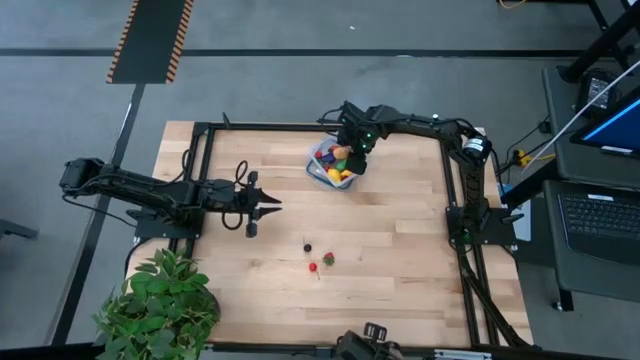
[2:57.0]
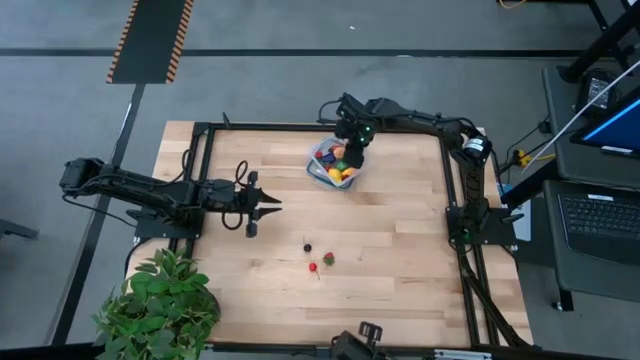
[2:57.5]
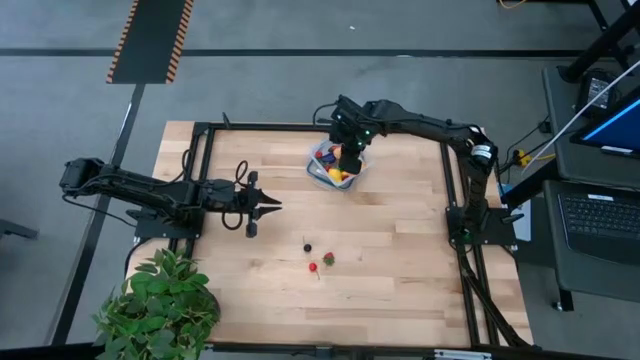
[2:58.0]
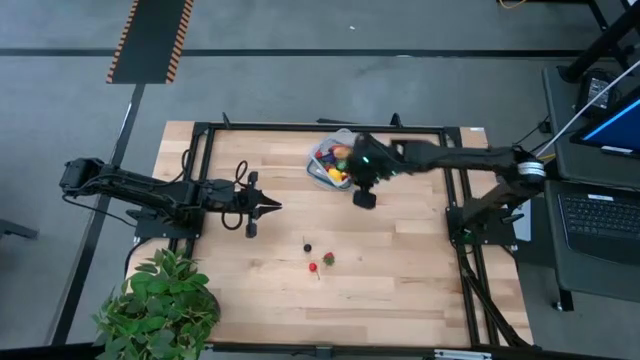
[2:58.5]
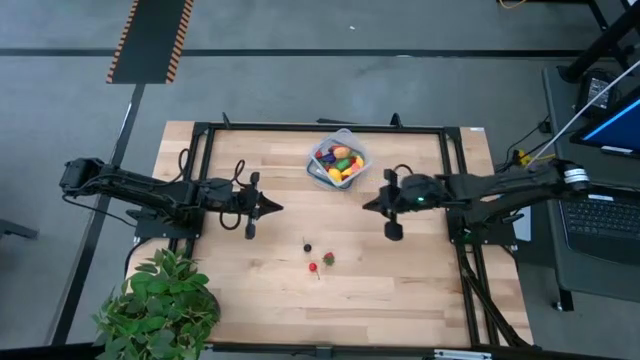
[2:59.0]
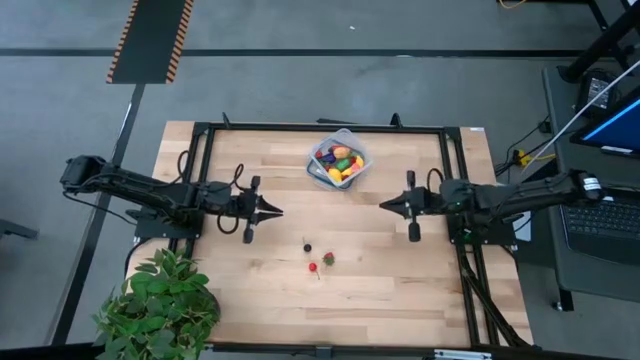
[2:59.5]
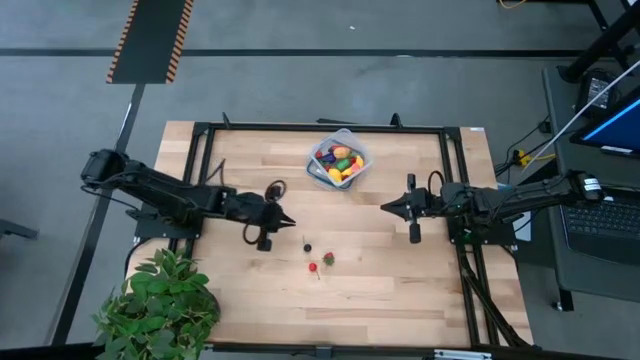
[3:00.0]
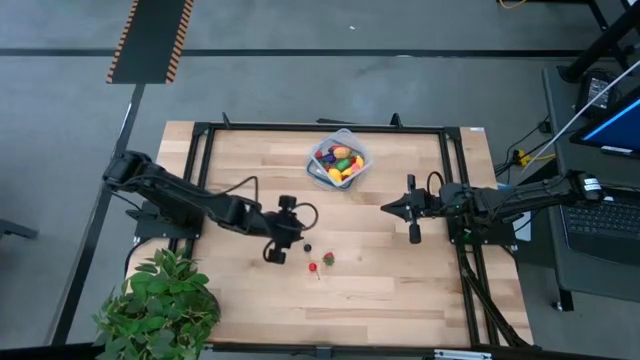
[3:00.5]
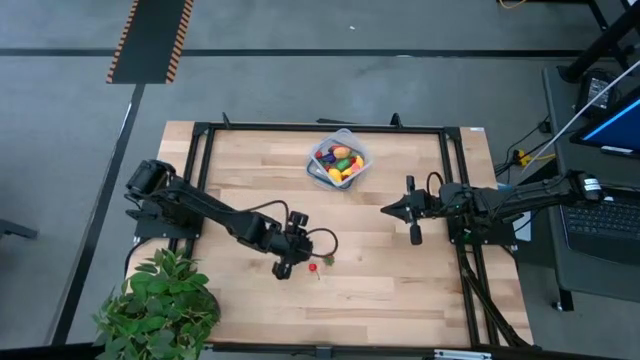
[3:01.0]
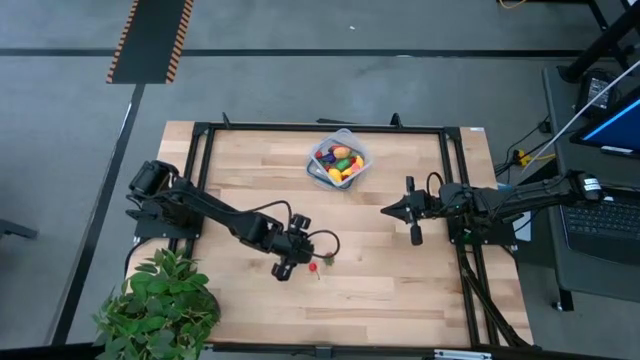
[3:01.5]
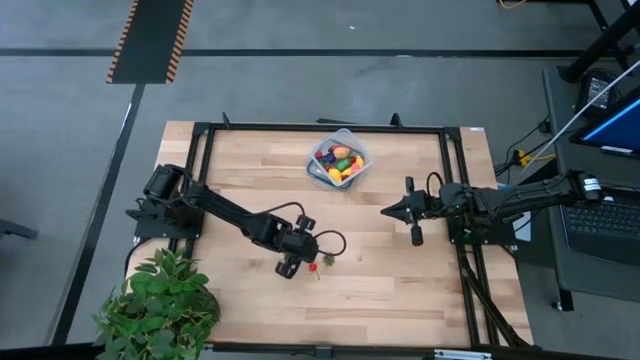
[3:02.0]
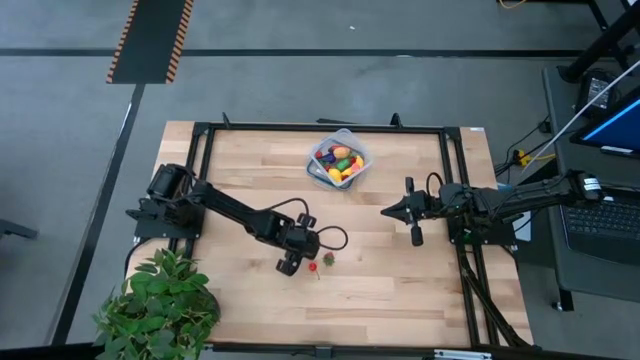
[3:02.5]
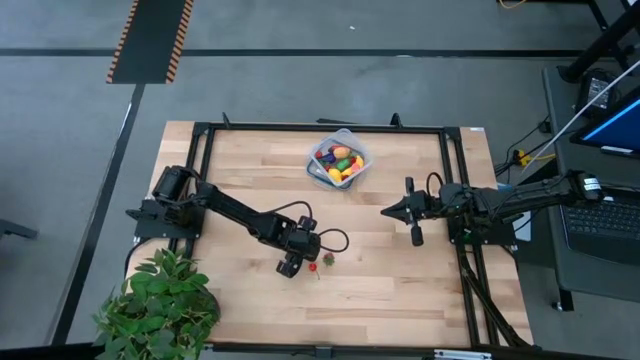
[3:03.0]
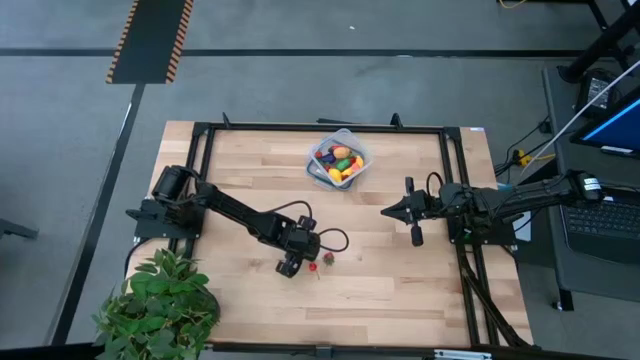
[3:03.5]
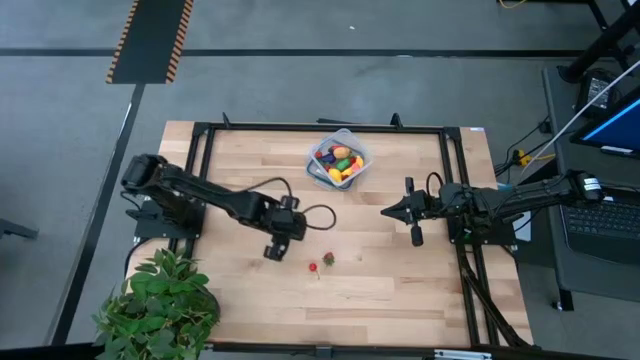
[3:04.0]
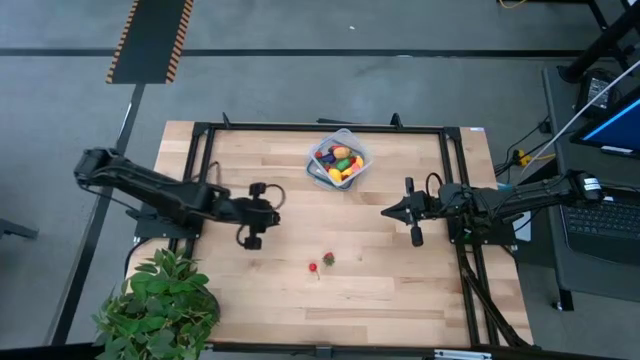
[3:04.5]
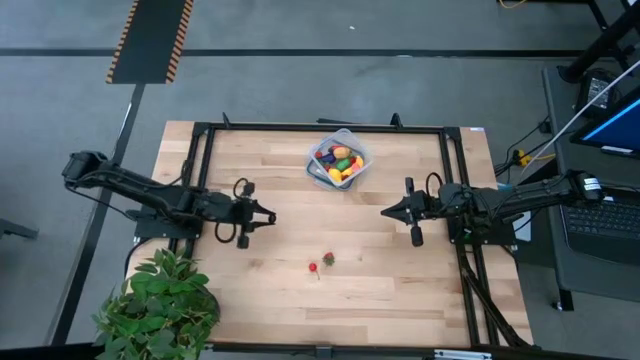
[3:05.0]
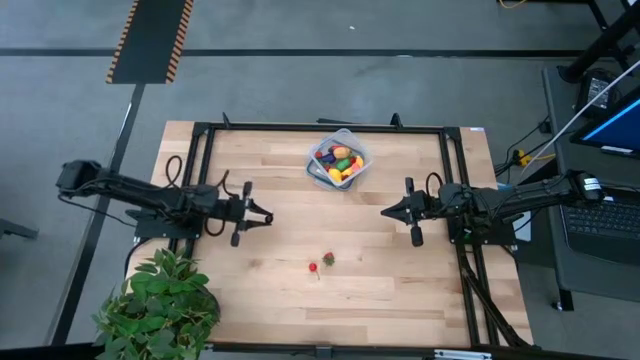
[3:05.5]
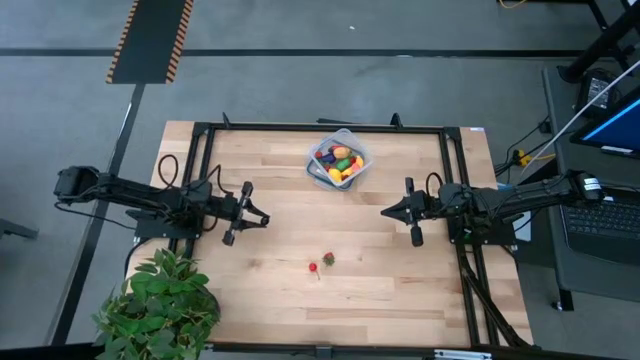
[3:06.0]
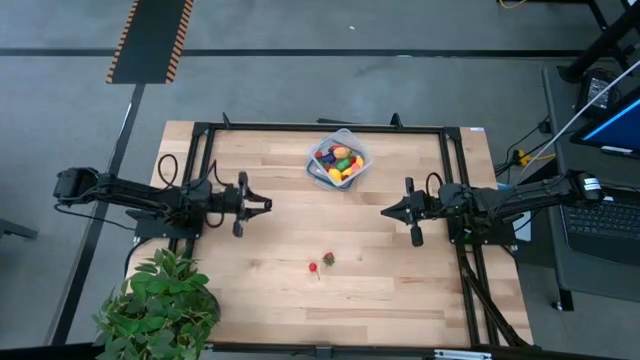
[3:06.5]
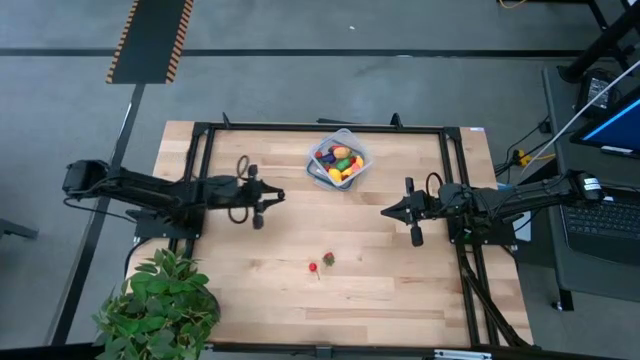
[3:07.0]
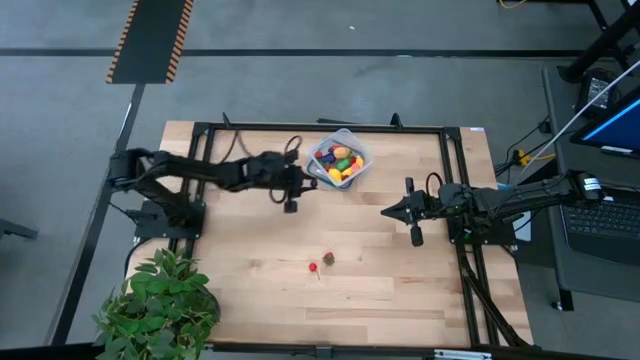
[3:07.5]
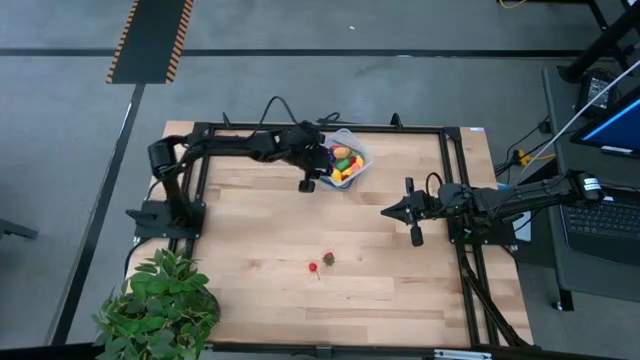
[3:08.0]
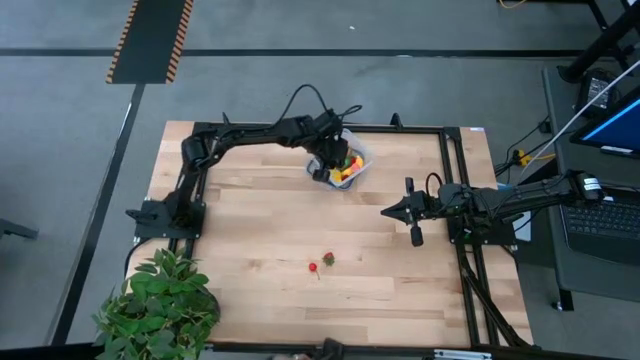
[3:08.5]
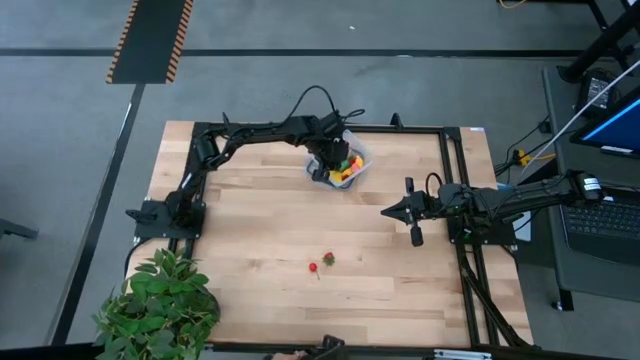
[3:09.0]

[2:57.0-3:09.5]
Task: Pick and placing Produce into tupperware
Put the black cherry into the transparent container

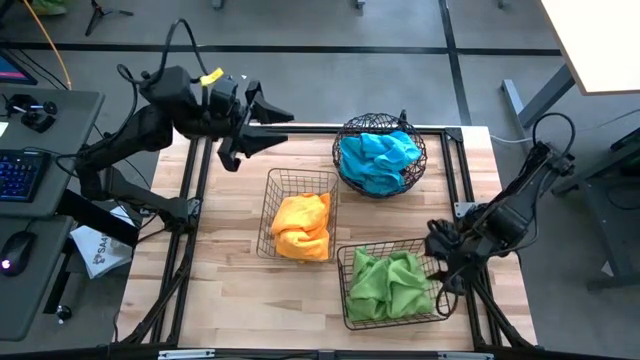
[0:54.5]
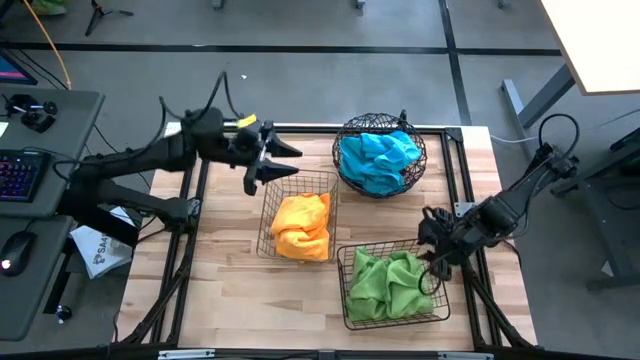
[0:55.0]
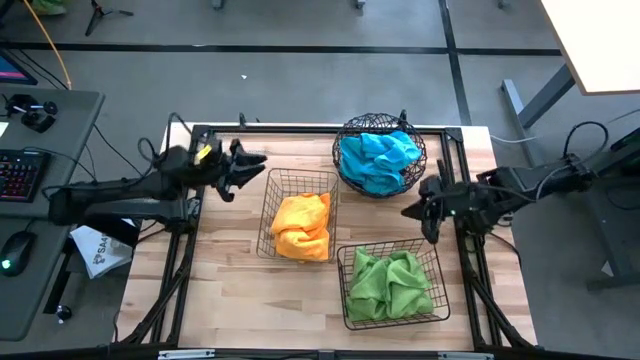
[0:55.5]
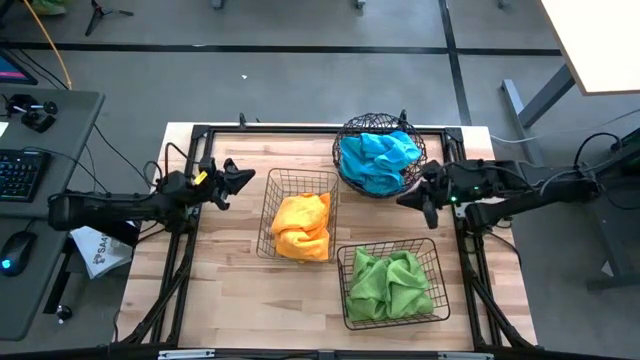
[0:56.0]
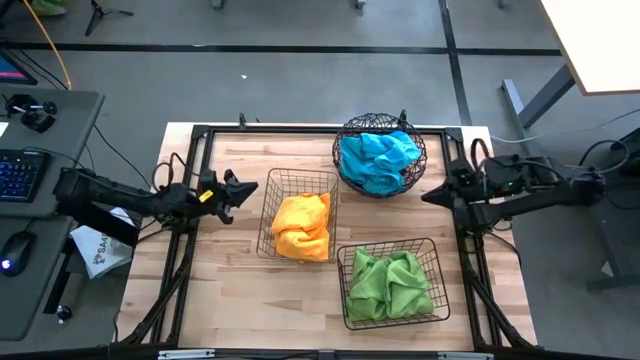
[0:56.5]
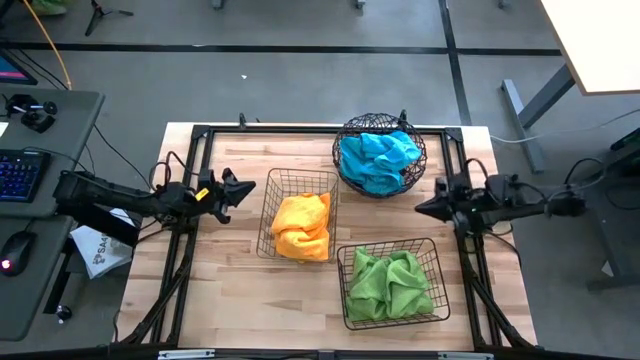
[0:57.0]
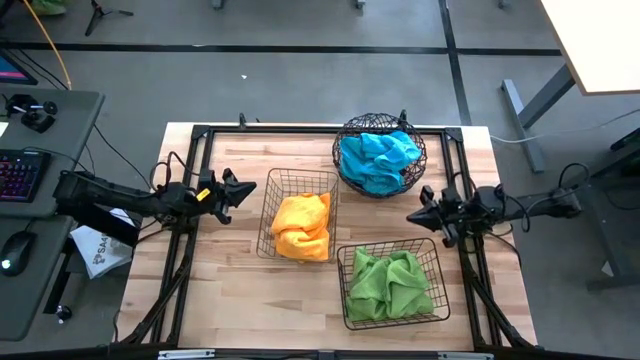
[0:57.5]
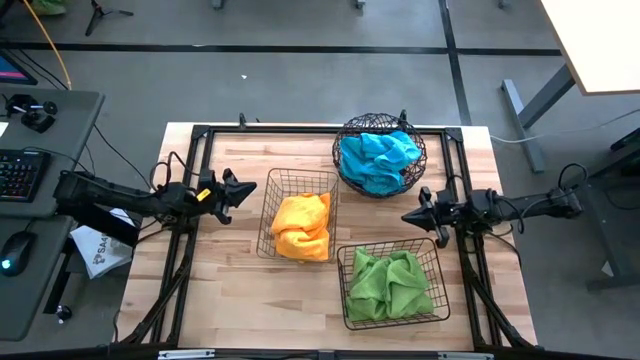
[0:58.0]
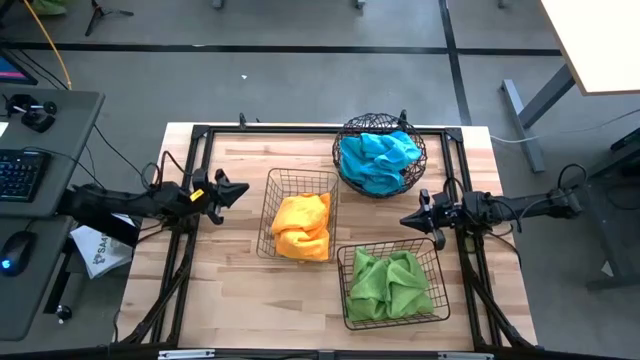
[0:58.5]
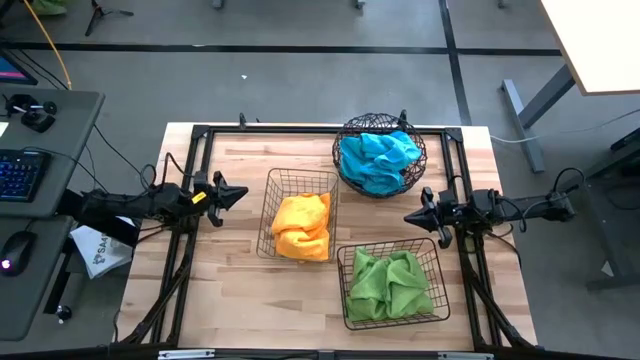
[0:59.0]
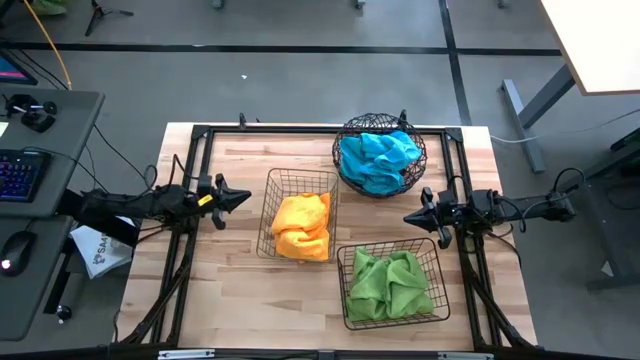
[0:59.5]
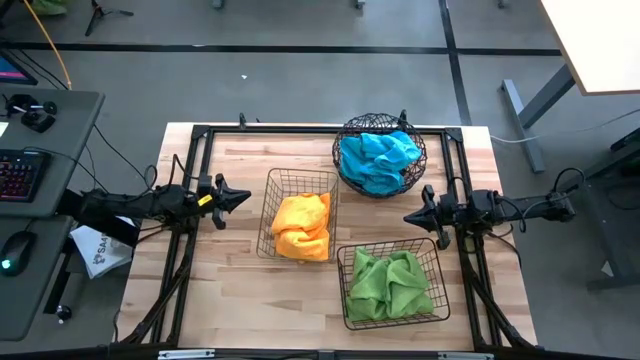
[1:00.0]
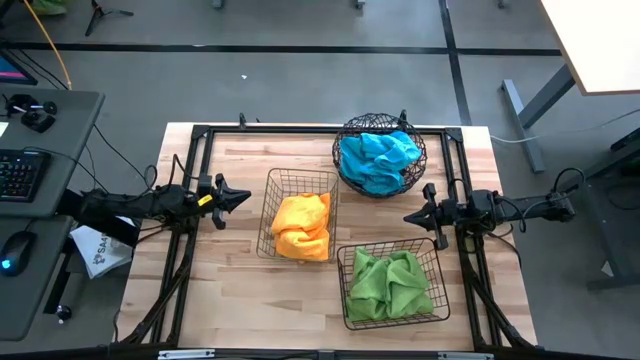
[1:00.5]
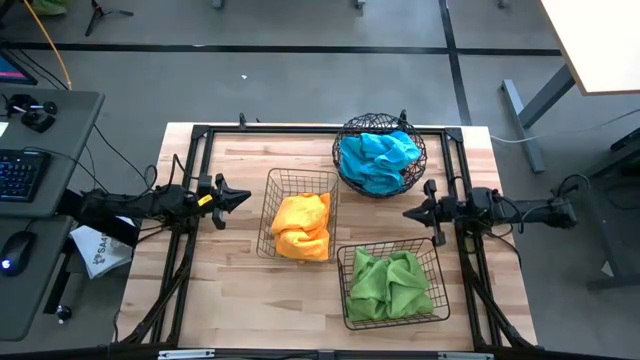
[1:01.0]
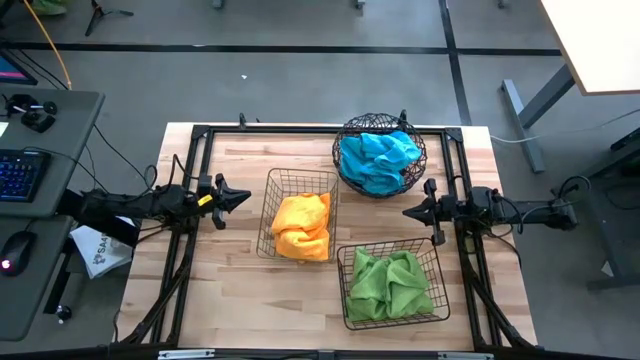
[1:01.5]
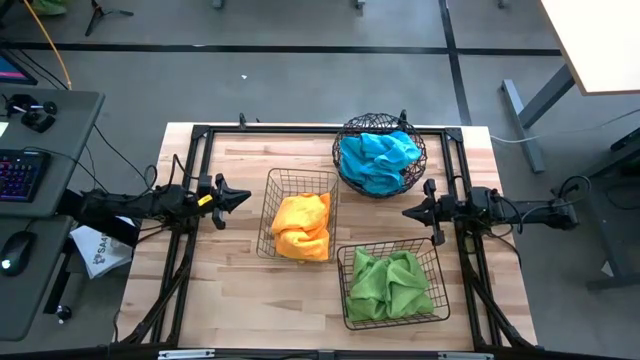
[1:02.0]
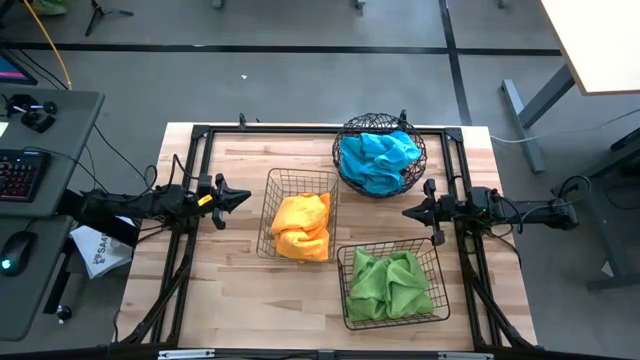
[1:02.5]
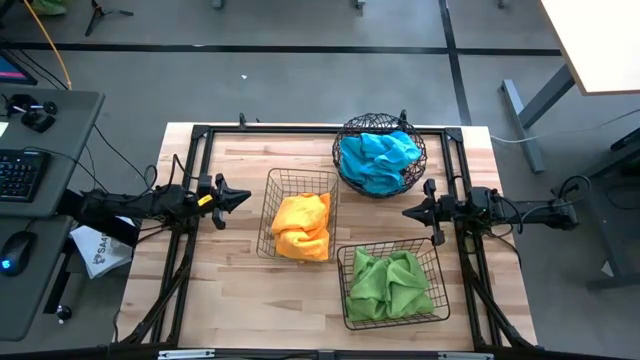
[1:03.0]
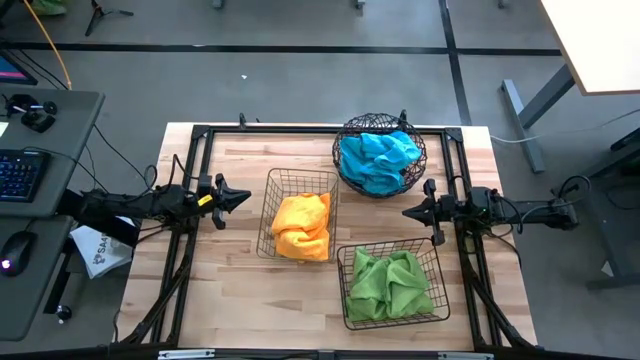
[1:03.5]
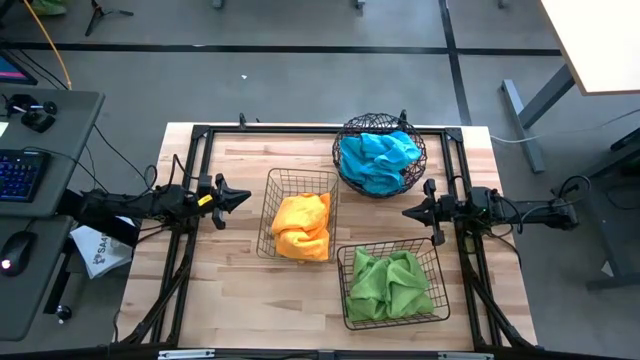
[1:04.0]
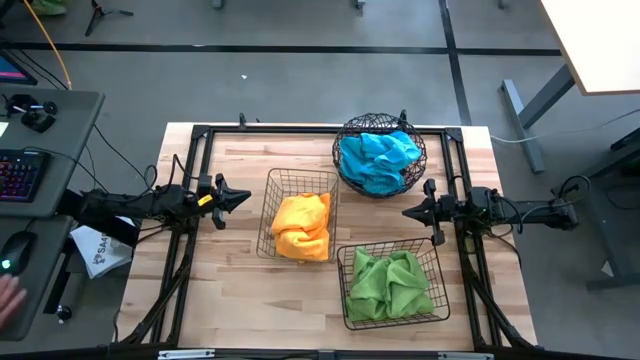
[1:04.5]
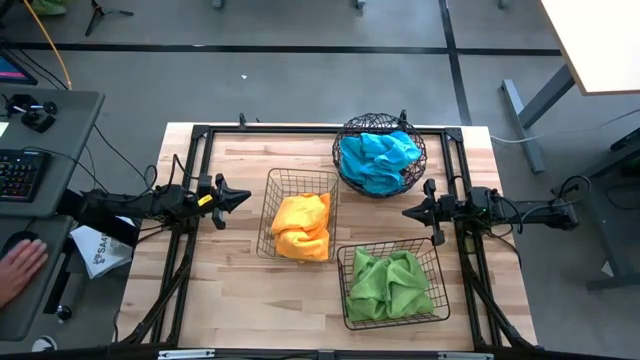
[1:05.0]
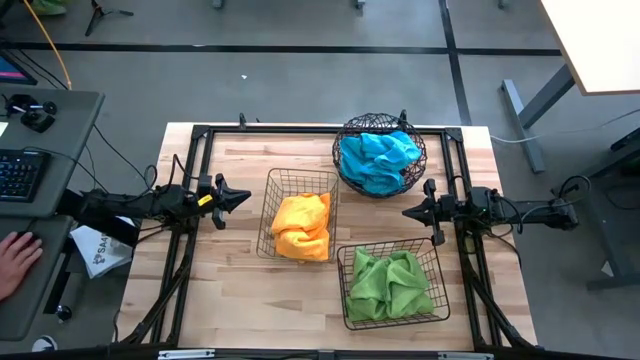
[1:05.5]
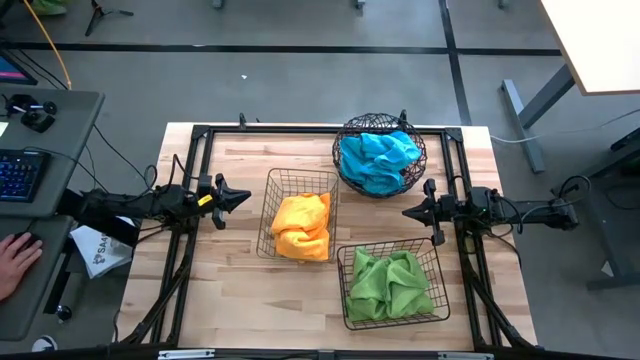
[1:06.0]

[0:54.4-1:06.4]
Task: Sort microfiber towel by color & place in baskets
Return to Home Position
